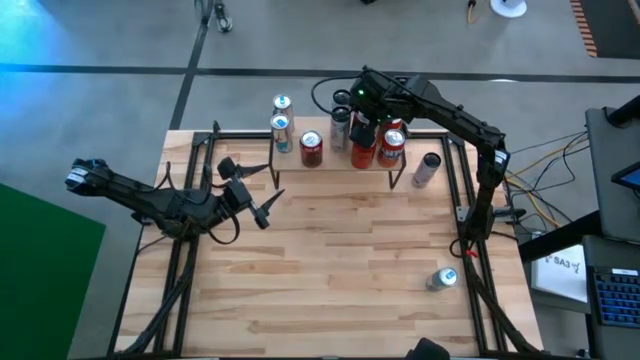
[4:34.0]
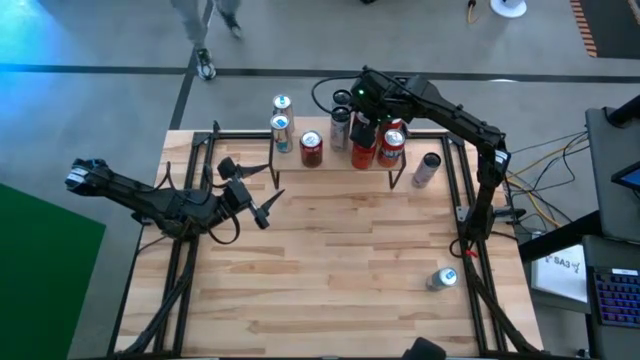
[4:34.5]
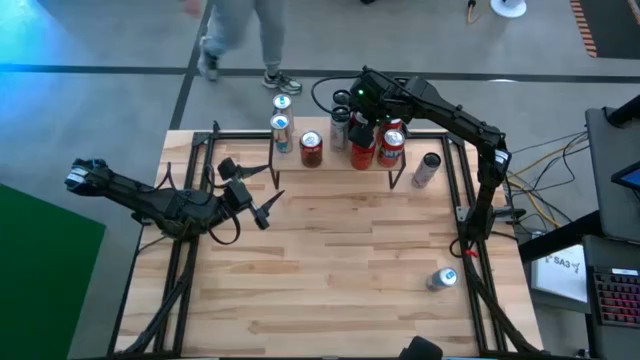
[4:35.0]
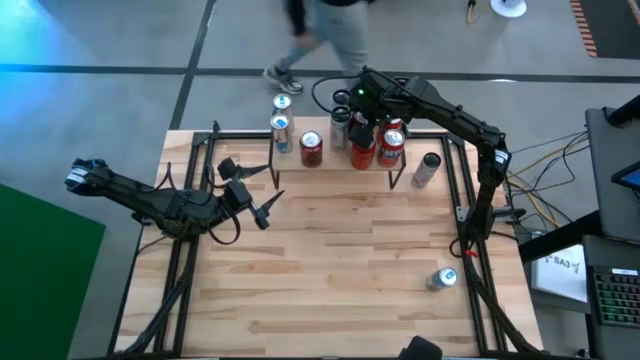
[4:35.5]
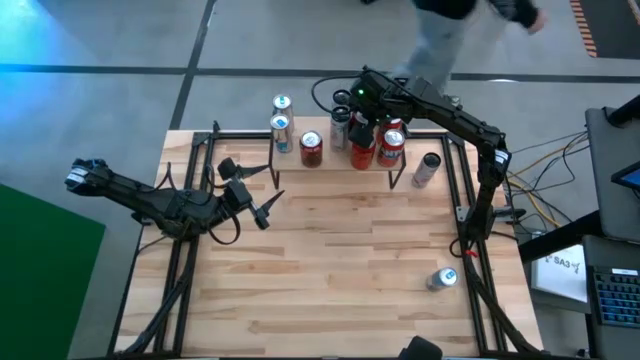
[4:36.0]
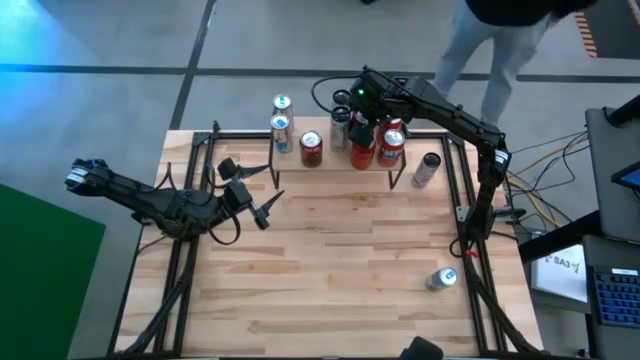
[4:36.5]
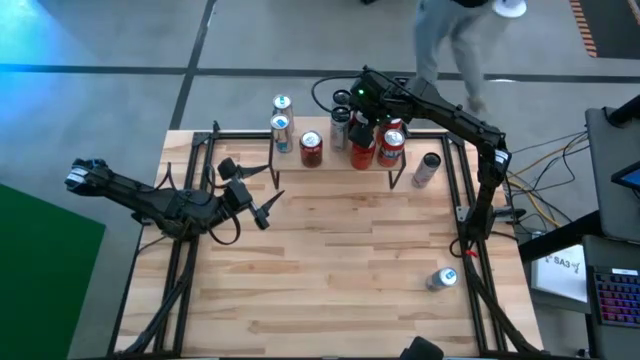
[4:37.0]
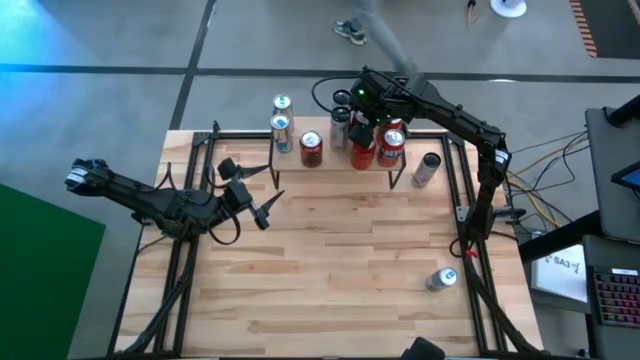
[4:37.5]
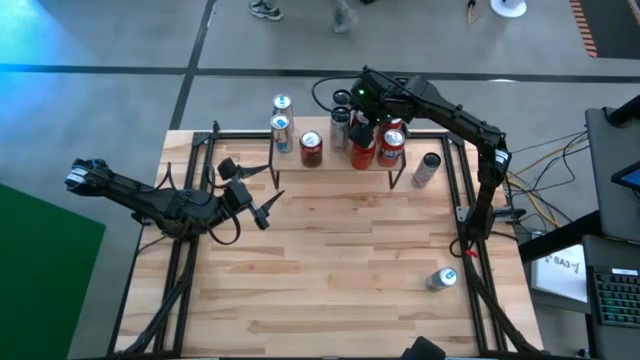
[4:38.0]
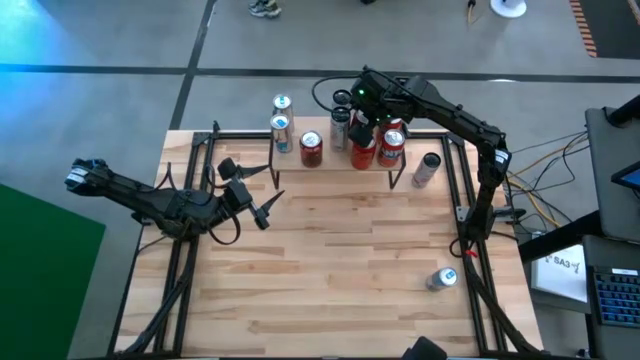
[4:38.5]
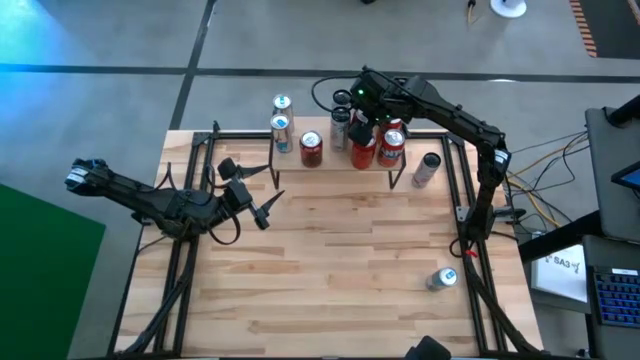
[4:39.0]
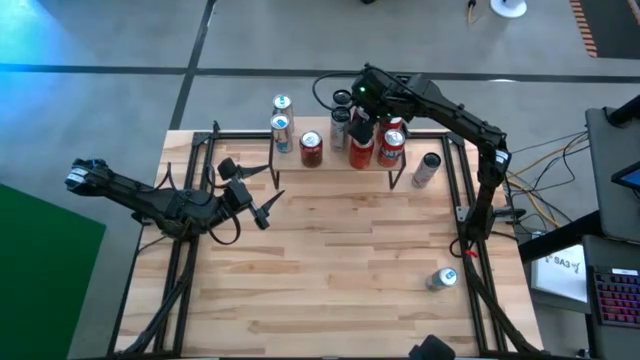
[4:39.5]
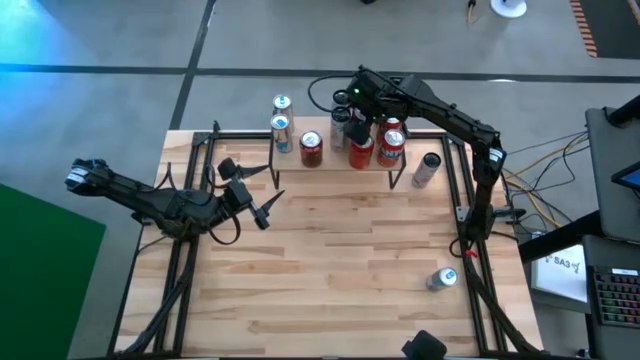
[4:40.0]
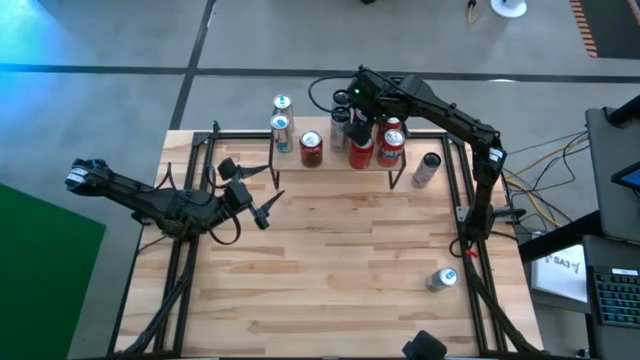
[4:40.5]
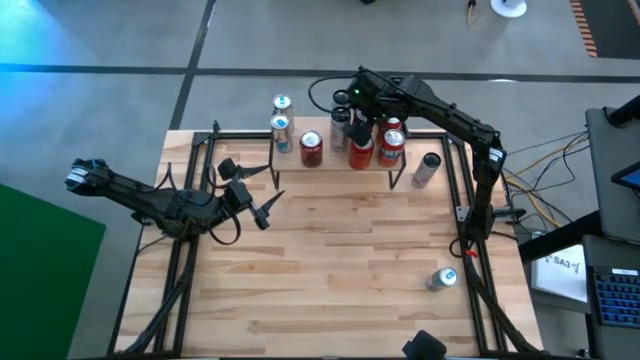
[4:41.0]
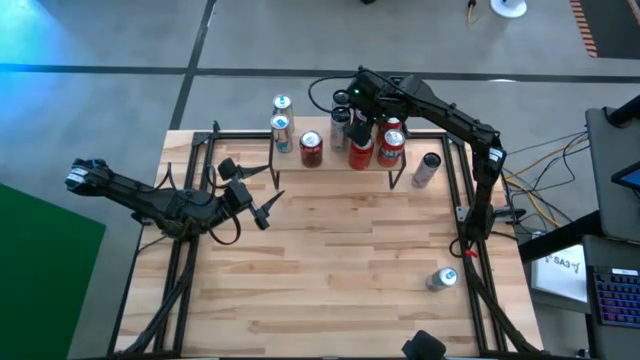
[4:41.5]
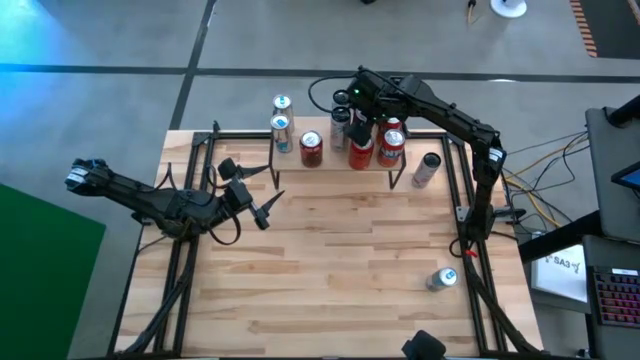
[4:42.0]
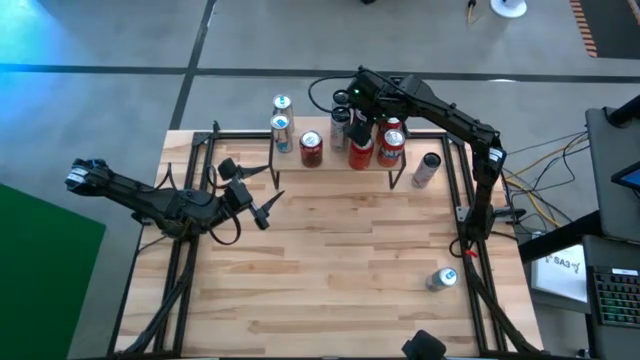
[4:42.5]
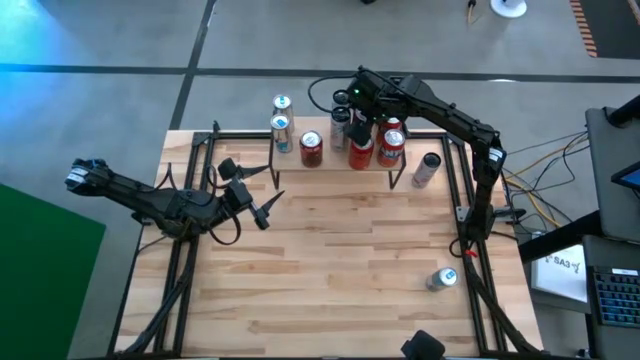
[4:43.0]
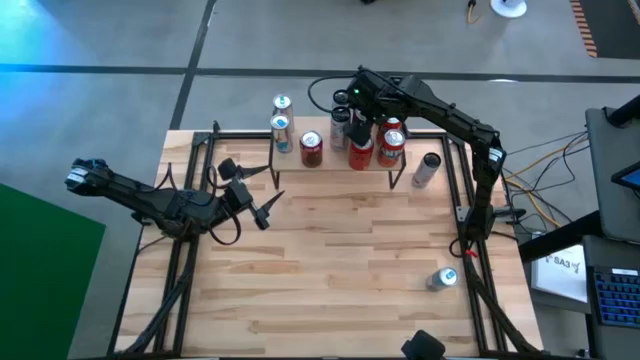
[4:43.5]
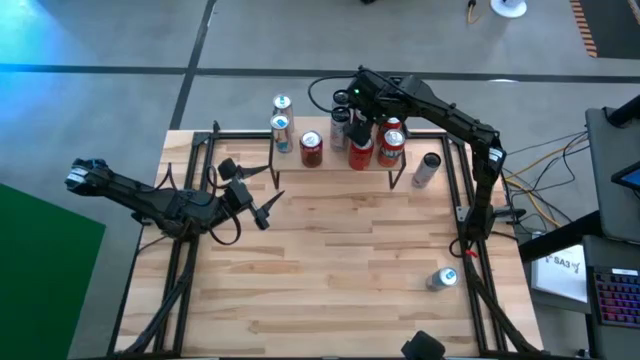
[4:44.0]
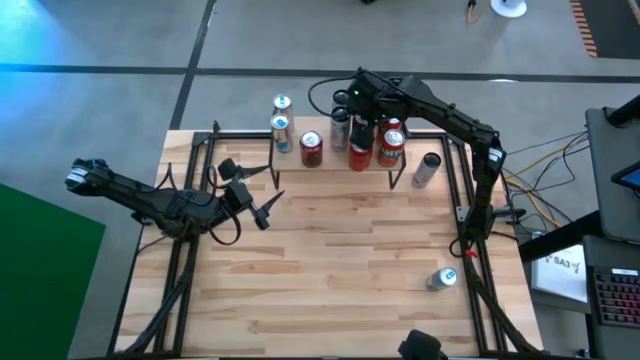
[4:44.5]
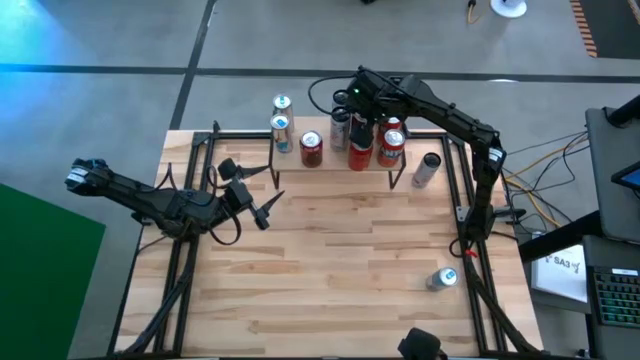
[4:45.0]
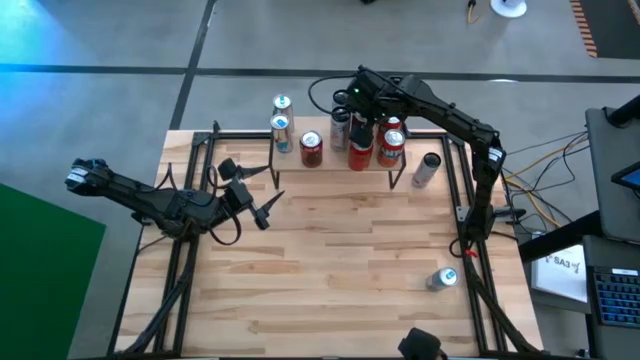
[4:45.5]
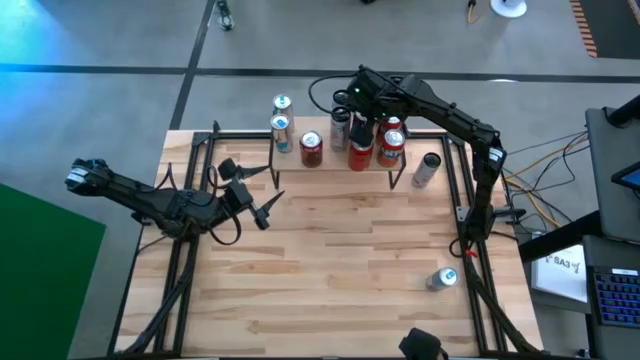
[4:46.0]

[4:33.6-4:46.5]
Task: Place canned beverage on shelf
Put the red soda can on the shelf

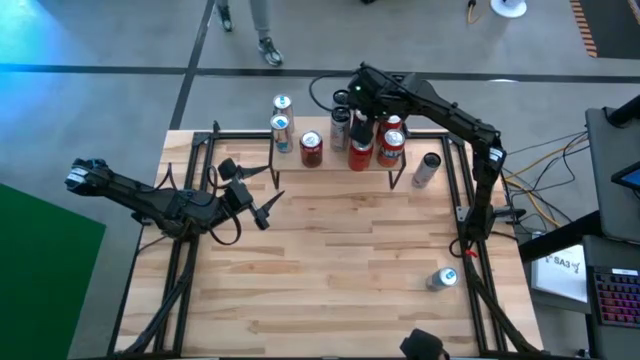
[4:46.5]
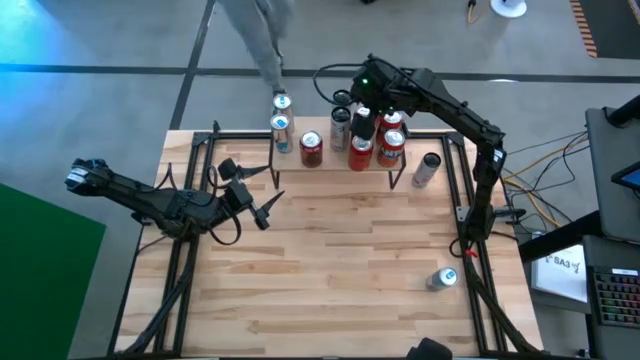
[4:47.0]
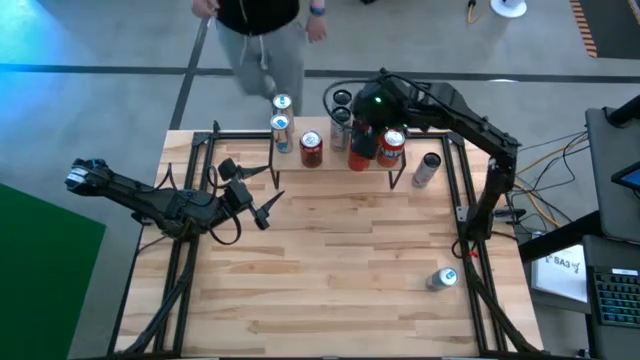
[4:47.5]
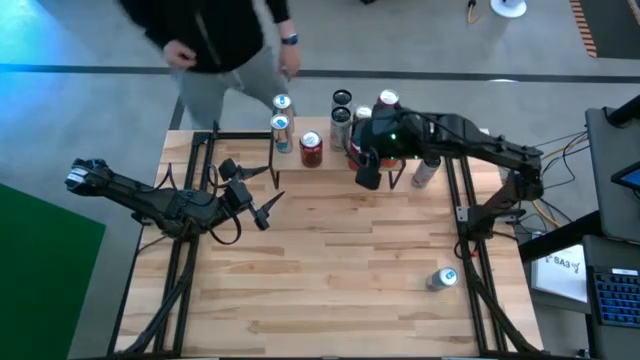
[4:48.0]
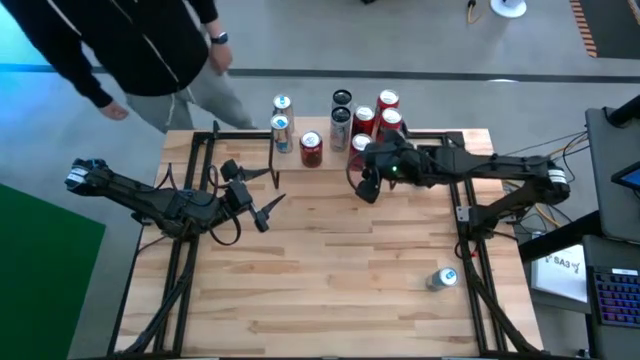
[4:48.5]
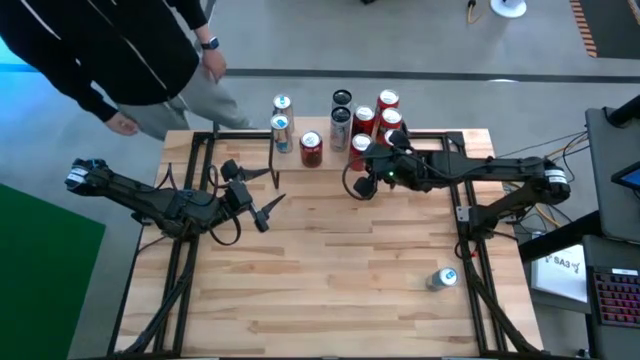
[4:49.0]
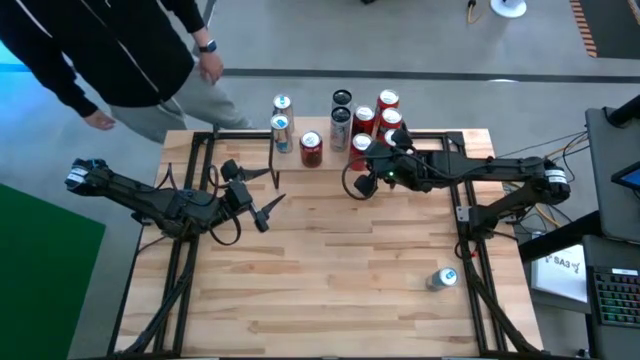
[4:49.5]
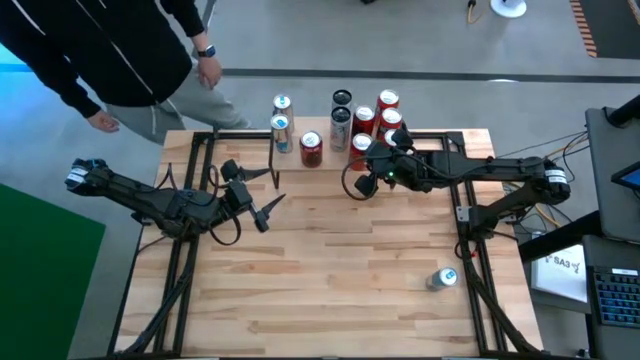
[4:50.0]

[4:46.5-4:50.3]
Adjust the red black soda can from the shelf

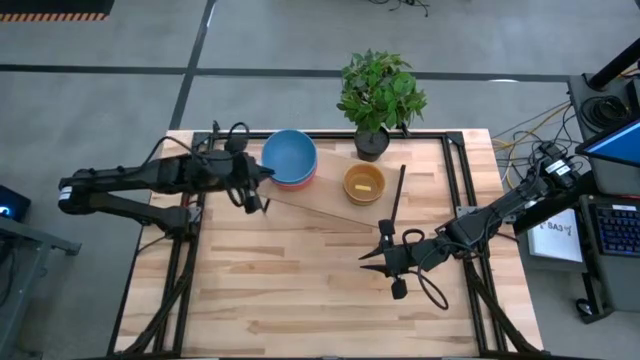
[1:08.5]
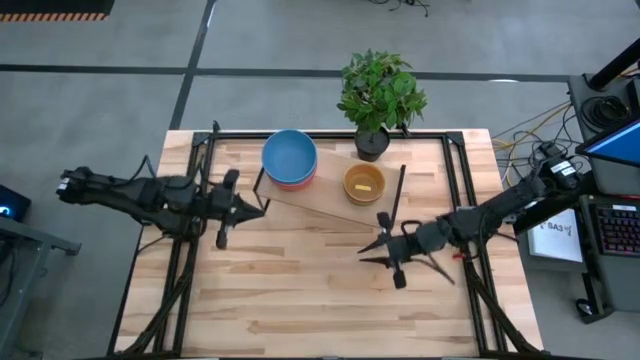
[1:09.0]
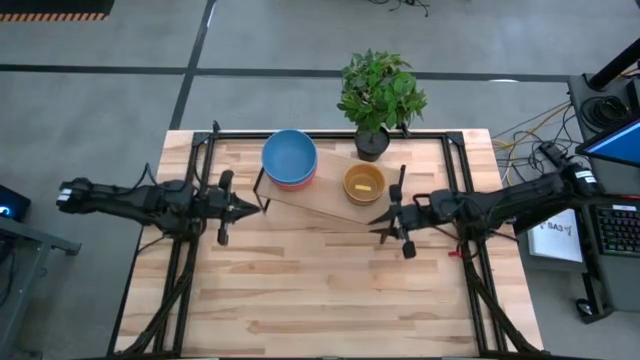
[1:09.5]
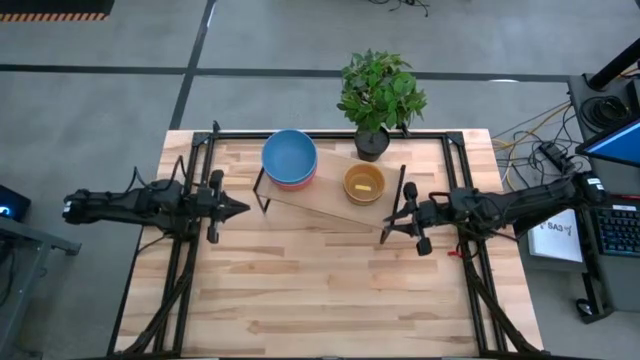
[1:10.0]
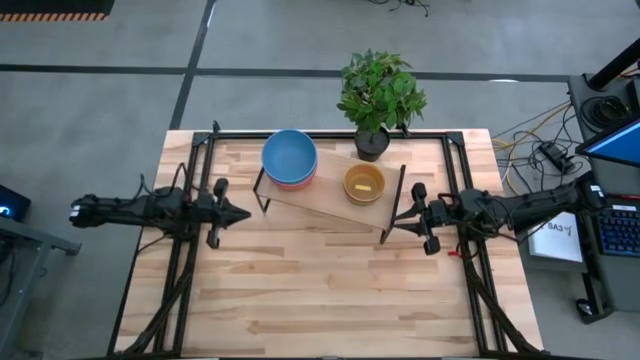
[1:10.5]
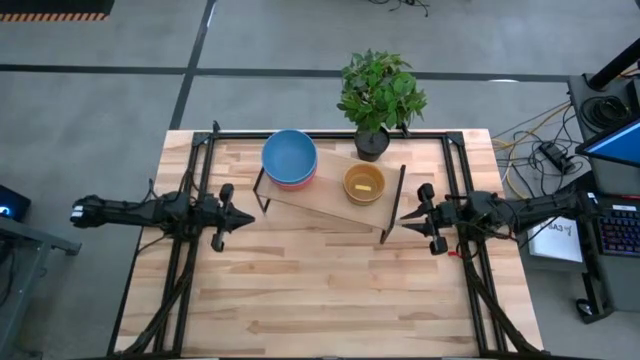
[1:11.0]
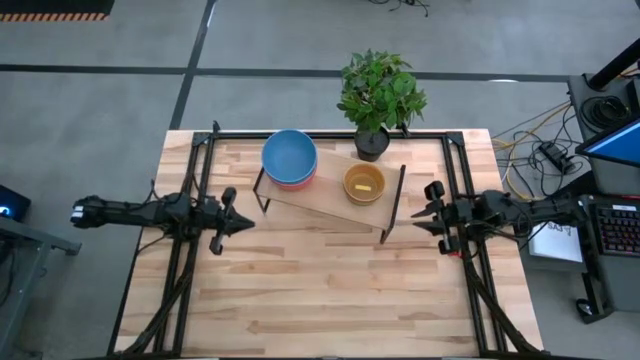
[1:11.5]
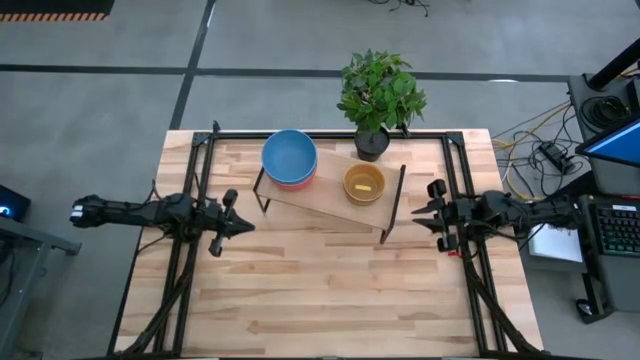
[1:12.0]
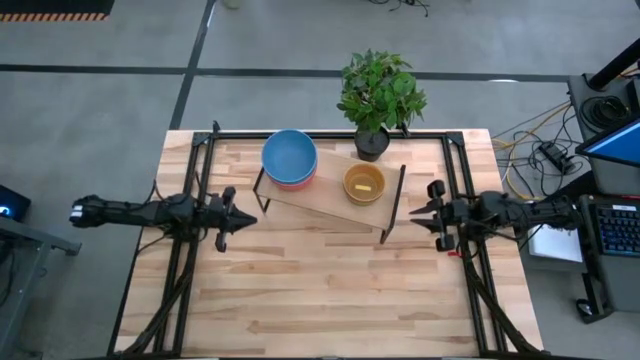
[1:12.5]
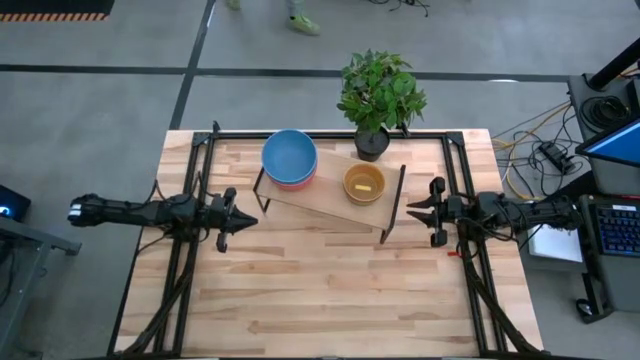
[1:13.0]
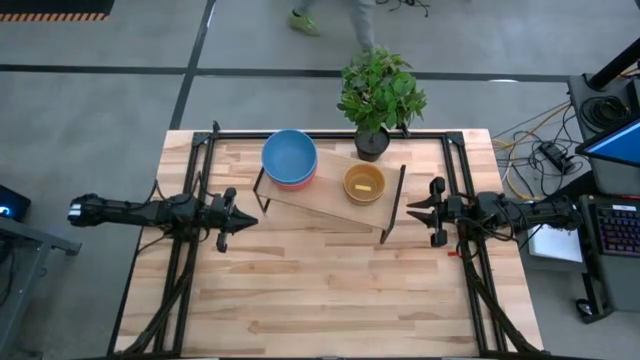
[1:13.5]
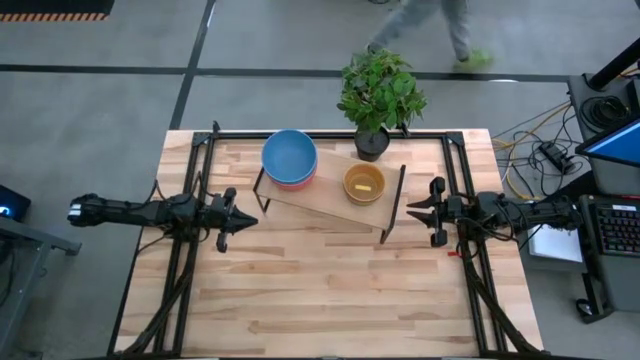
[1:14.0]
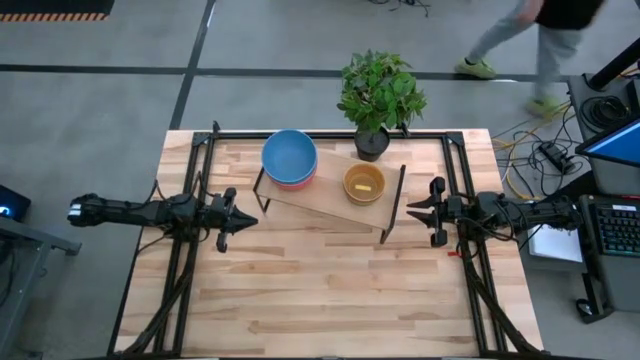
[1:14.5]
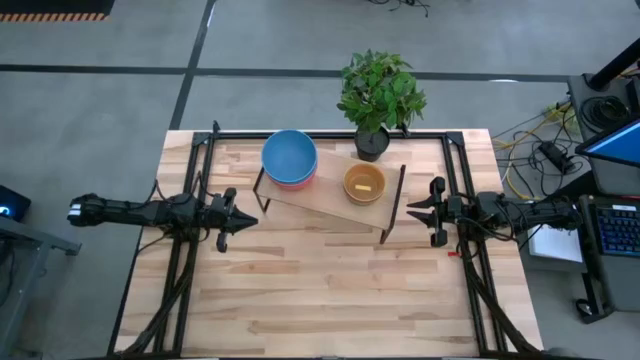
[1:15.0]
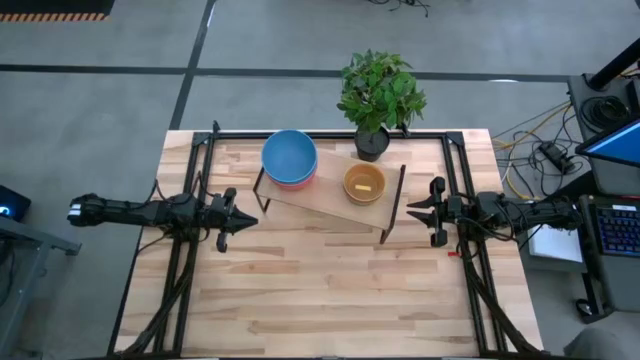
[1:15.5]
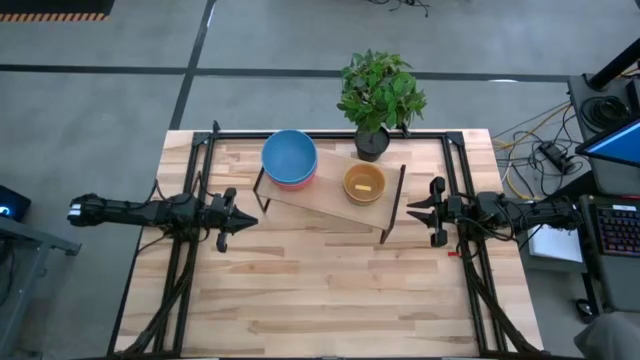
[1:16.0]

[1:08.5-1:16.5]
Task: Place and stack bowls onto a shelf
Return to Home Position
